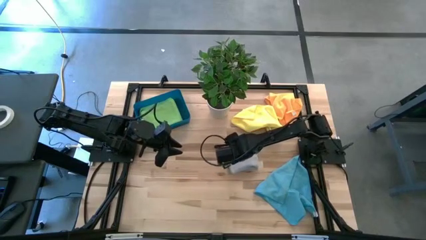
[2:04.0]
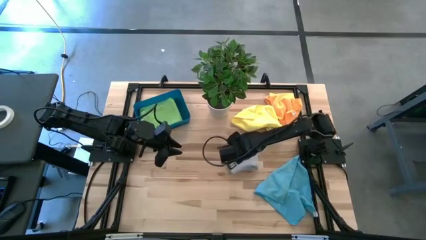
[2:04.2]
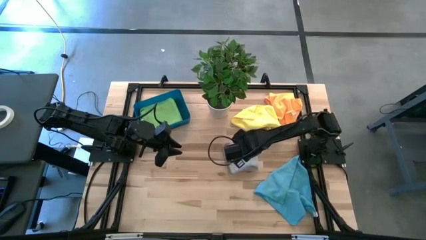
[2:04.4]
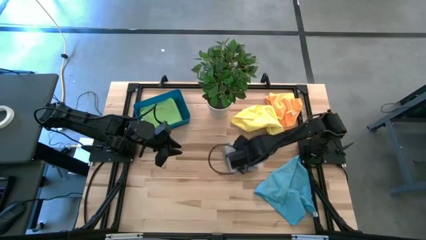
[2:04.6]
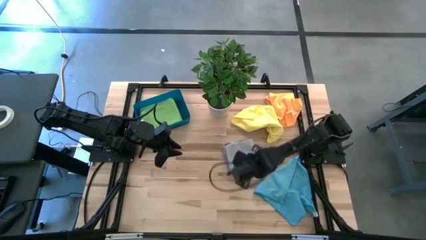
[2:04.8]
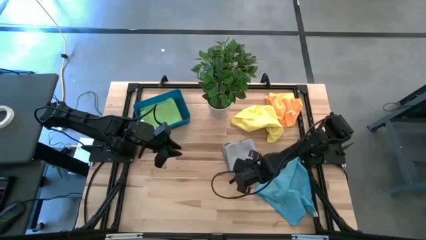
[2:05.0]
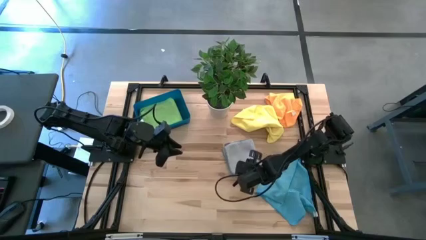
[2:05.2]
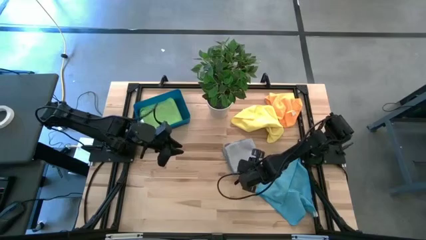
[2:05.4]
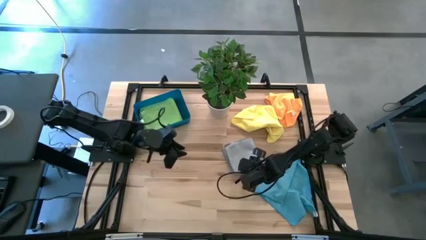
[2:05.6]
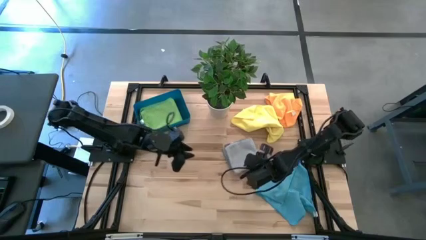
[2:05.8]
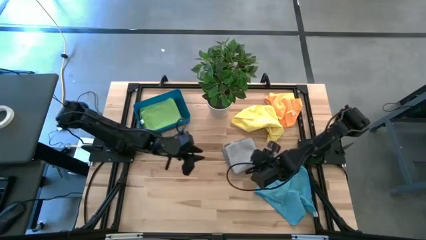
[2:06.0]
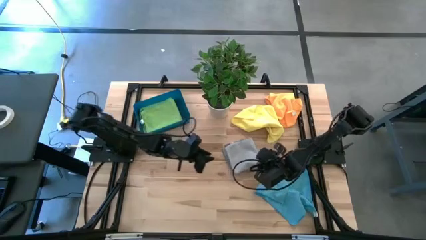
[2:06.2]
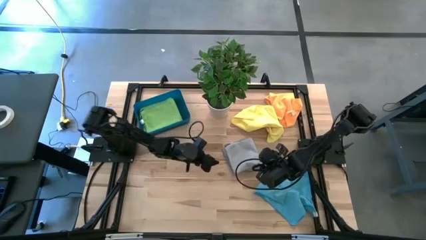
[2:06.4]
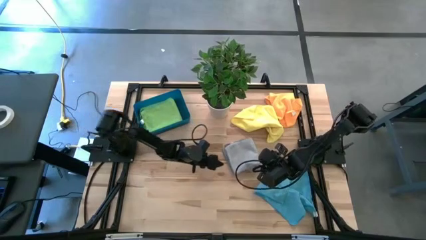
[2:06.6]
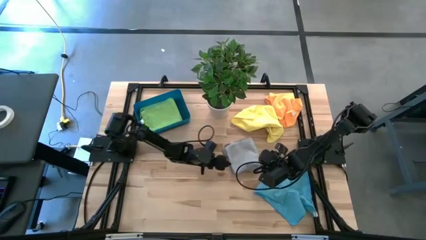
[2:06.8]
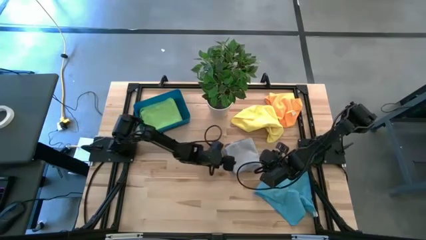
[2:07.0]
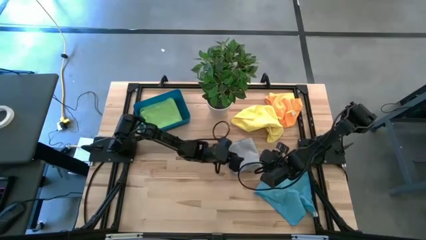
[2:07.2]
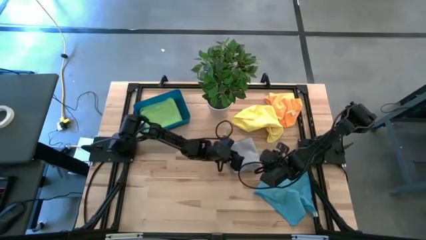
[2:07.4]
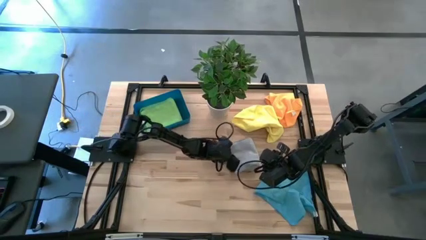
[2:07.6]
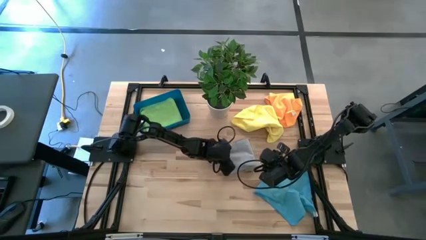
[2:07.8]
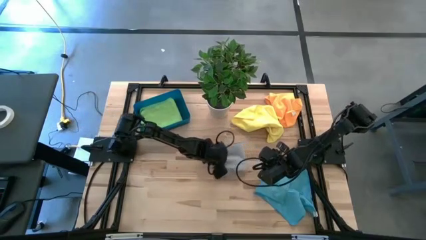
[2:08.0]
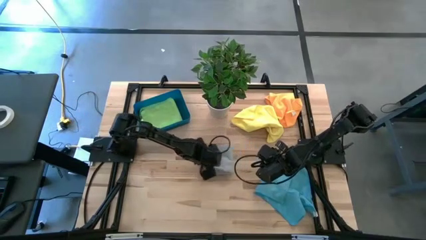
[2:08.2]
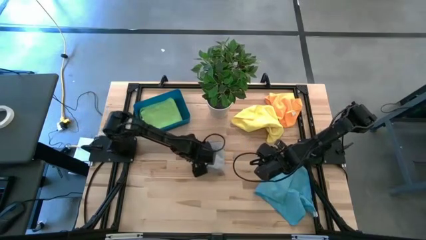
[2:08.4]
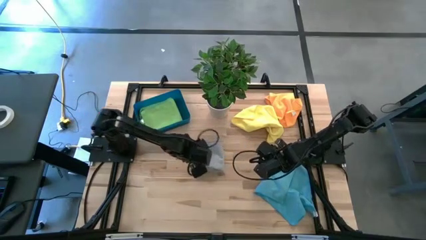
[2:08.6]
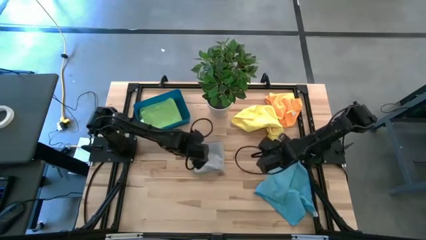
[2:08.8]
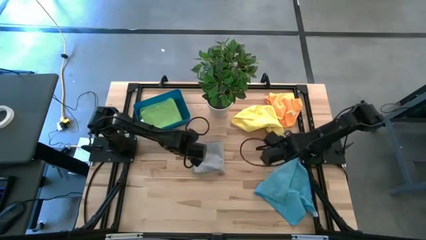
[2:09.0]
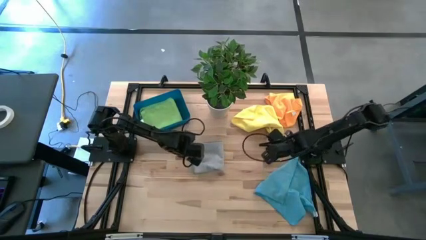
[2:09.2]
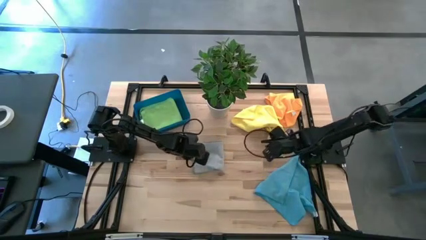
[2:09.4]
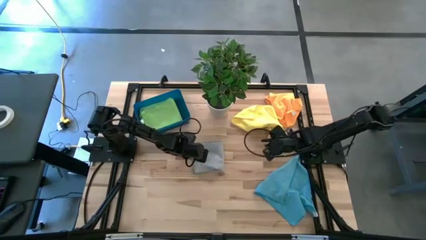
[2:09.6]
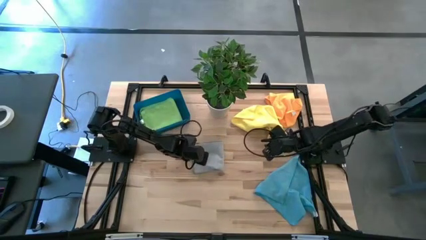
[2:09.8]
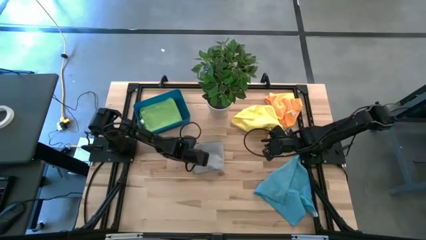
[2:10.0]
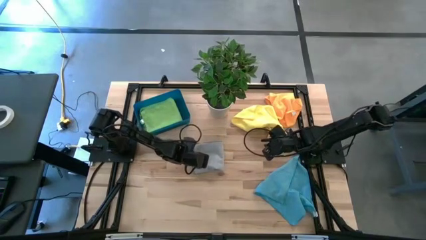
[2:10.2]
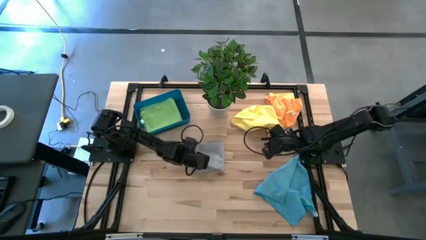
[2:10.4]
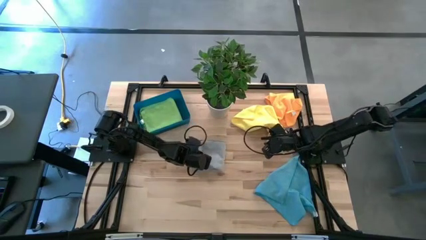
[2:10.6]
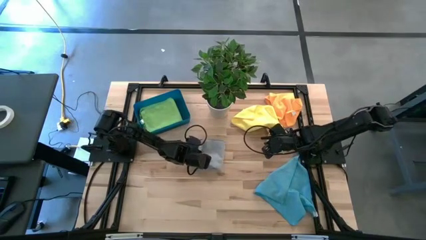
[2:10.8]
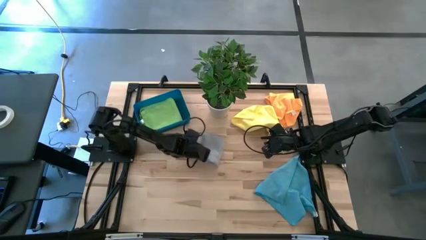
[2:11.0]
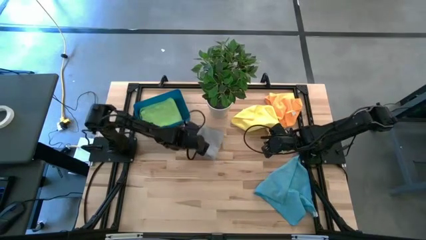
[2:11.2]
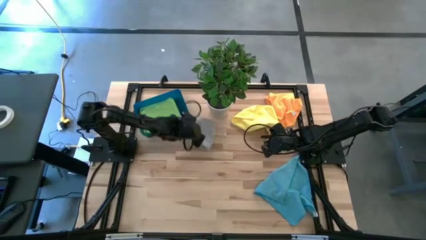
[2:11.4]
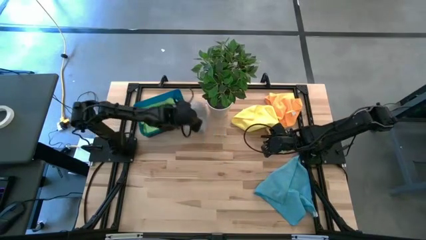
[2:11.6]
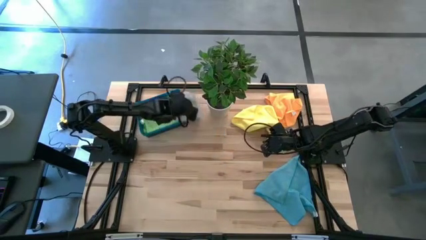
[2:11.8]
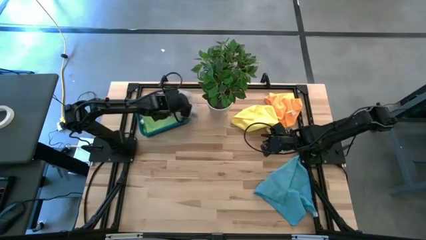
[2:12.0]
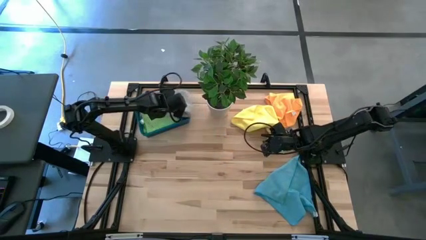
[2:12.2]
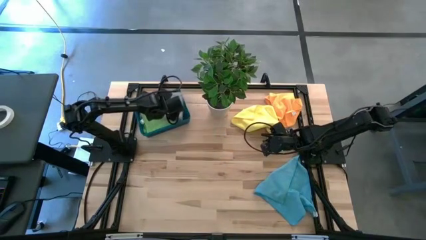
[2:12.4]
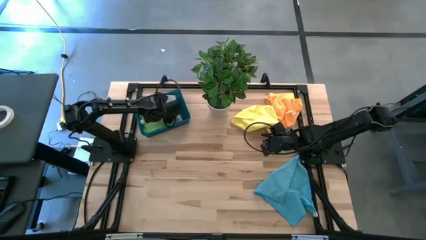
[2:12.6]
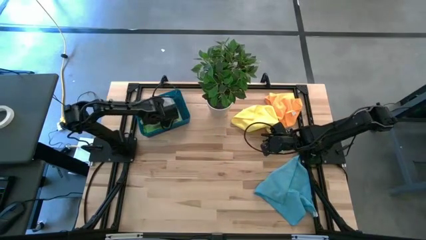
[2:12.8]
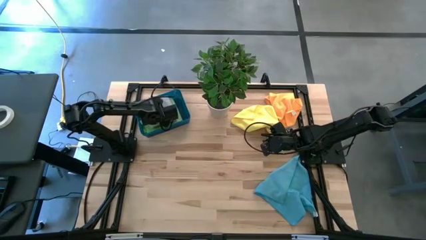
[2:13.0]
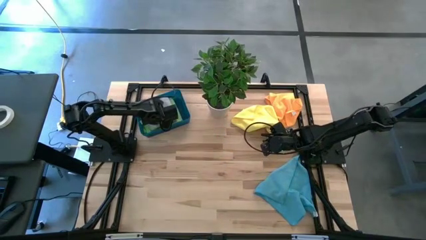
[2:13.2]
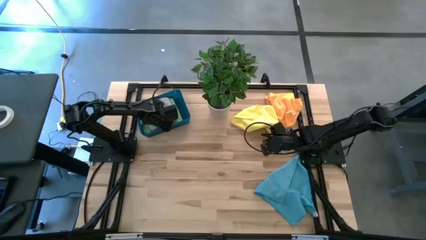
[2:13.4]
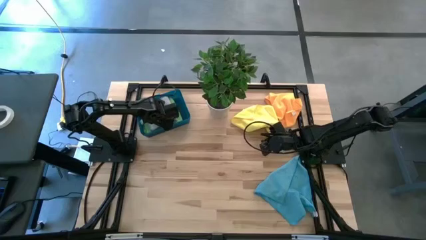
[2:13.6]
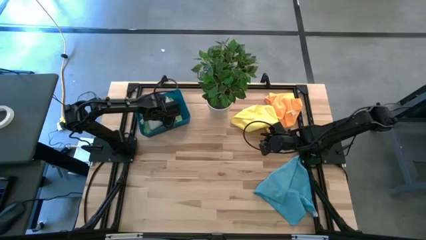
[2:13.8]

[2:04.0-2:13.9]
Task: Fold microfiber towels
Put the gray towel into the blue bin

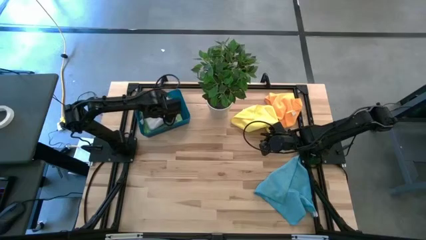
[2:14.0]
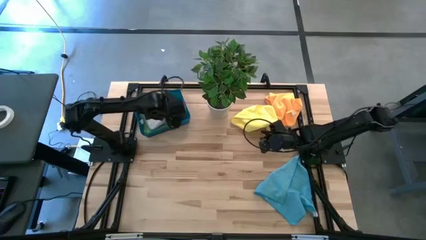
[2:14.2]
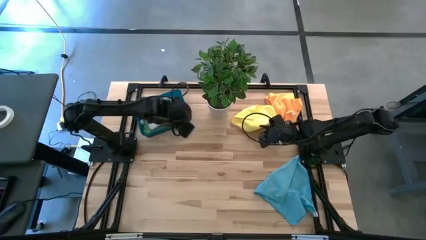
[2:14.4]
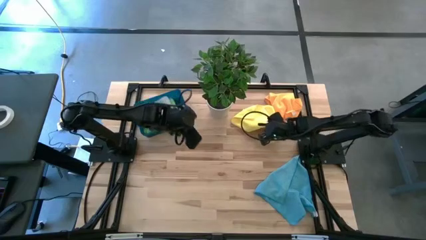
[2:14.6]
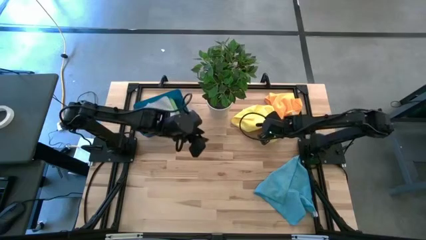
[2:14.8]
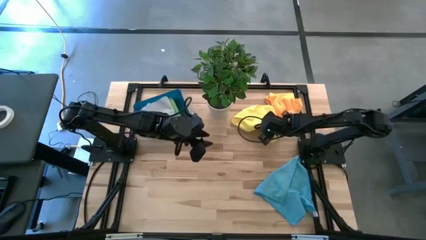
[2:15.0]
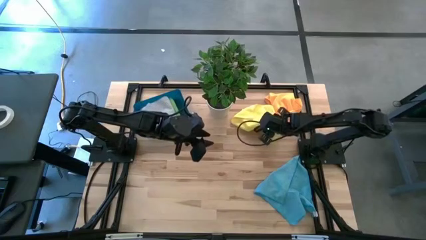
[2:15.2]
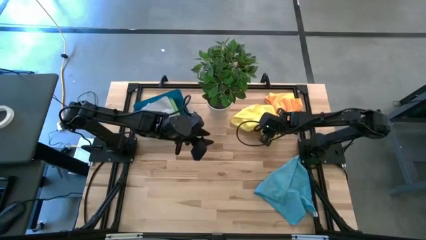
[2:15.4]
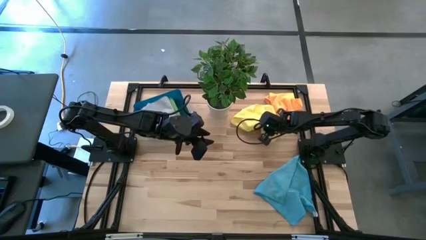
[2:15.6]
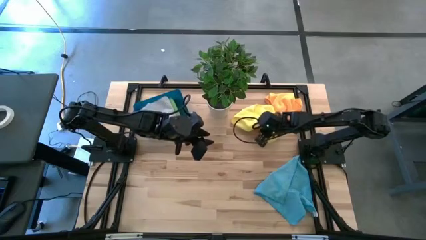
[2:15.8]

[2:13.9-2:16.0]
Fold the yellow towel
